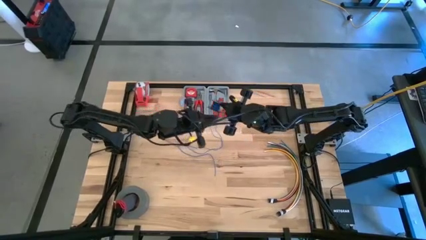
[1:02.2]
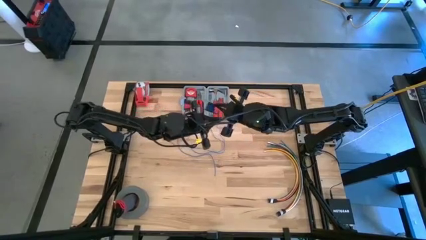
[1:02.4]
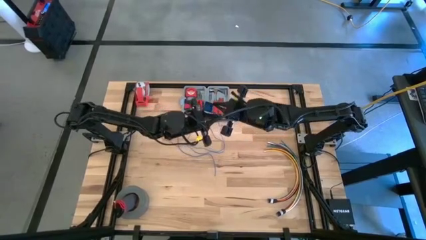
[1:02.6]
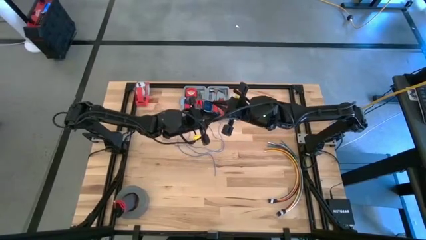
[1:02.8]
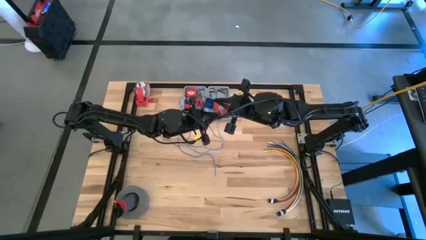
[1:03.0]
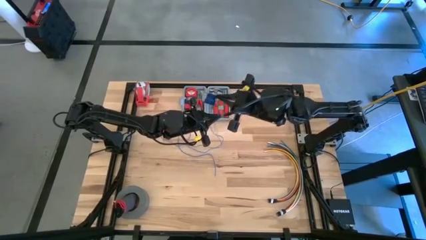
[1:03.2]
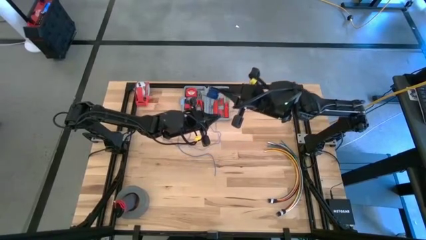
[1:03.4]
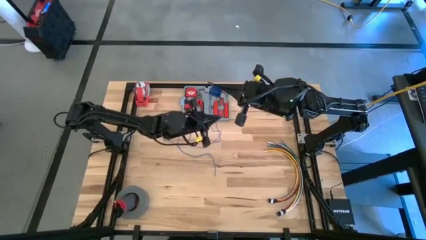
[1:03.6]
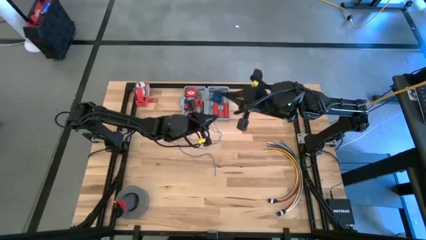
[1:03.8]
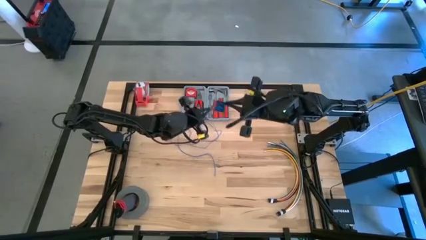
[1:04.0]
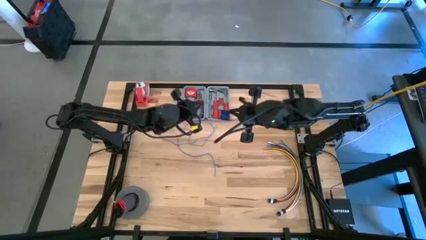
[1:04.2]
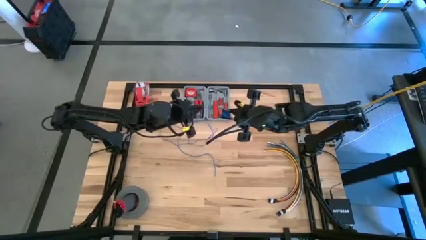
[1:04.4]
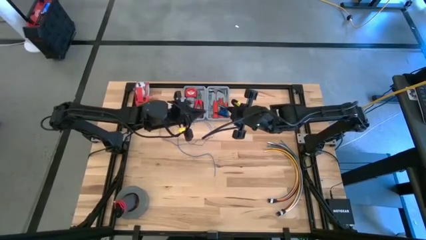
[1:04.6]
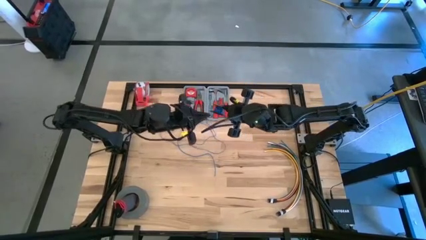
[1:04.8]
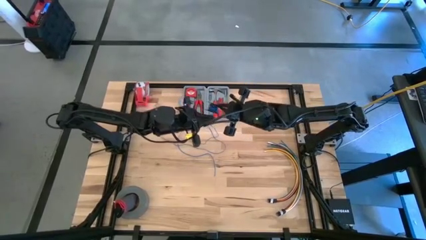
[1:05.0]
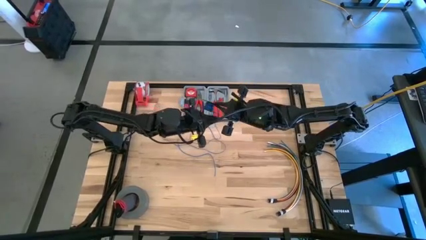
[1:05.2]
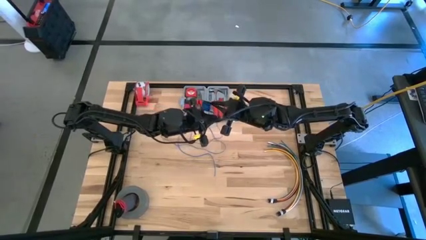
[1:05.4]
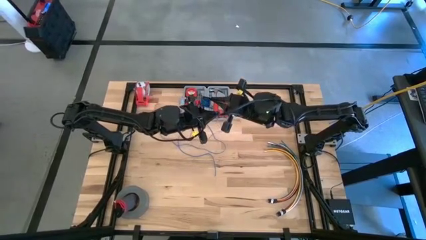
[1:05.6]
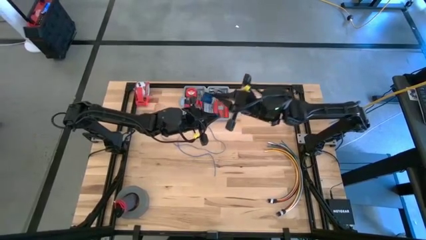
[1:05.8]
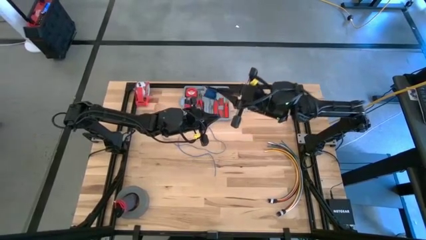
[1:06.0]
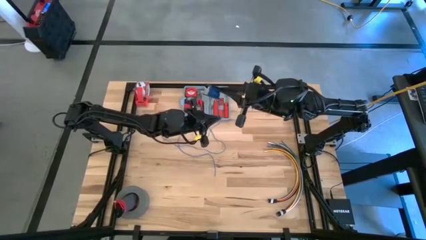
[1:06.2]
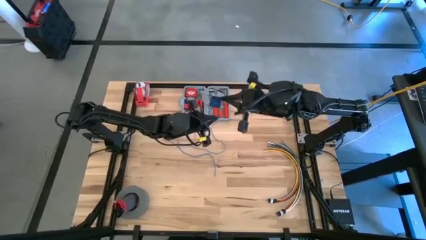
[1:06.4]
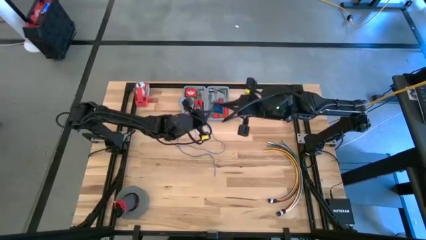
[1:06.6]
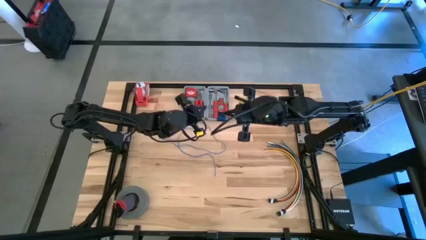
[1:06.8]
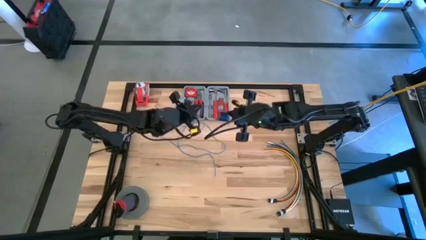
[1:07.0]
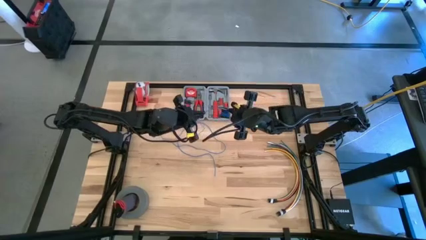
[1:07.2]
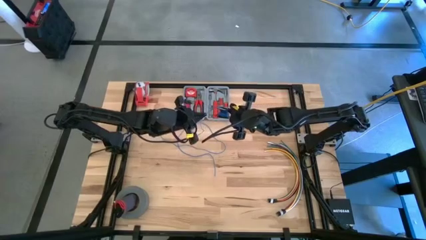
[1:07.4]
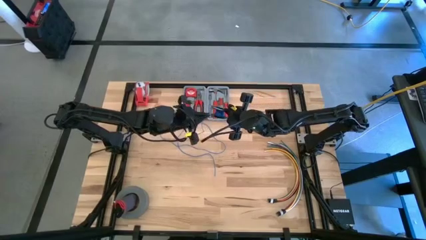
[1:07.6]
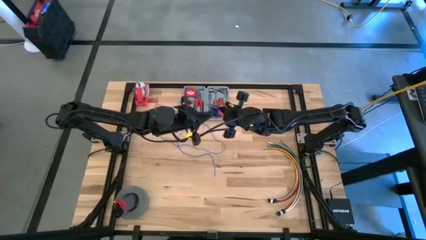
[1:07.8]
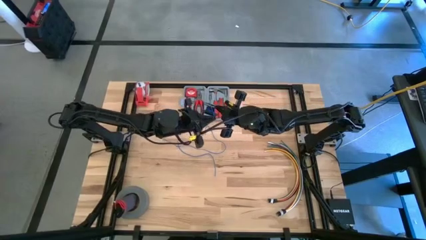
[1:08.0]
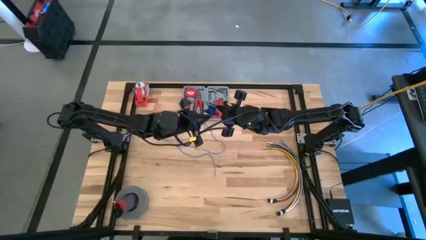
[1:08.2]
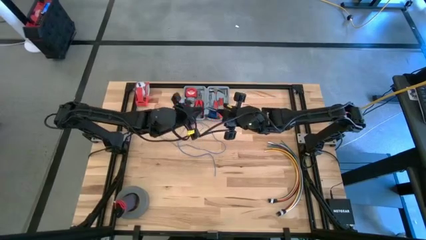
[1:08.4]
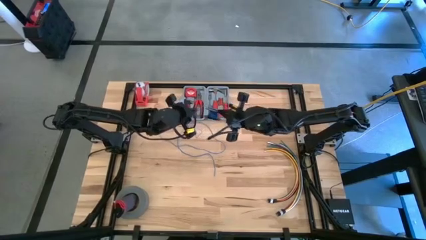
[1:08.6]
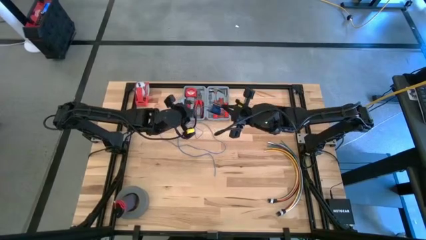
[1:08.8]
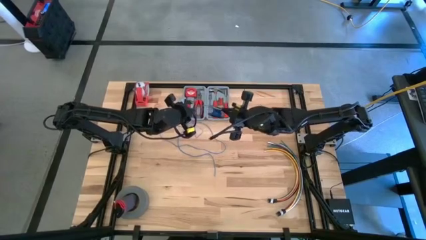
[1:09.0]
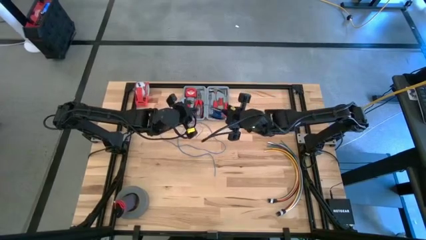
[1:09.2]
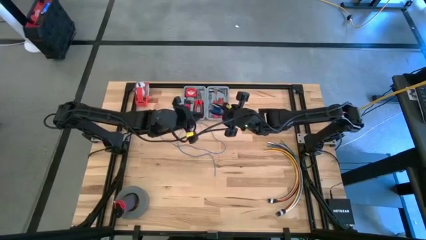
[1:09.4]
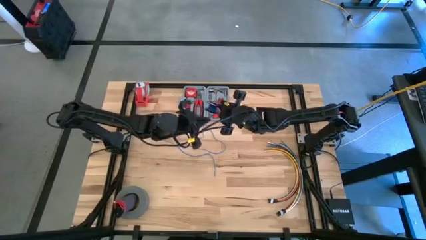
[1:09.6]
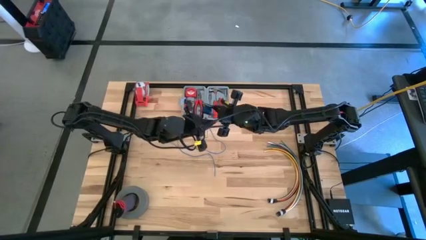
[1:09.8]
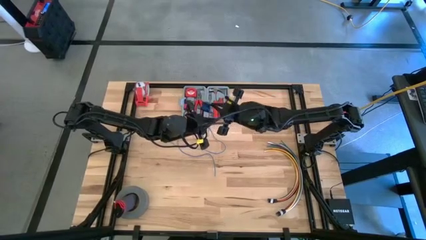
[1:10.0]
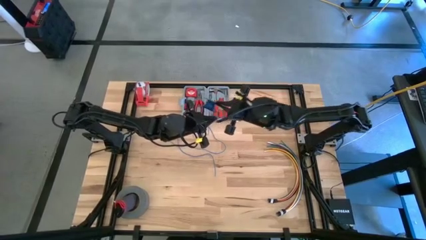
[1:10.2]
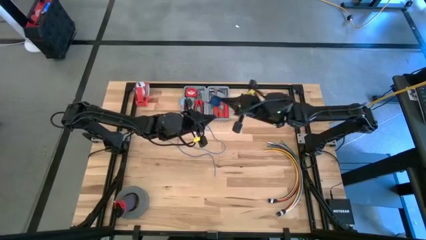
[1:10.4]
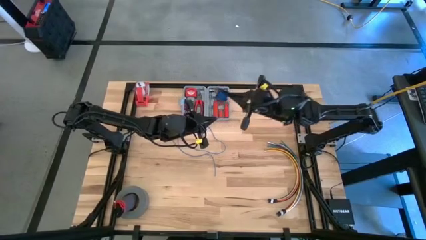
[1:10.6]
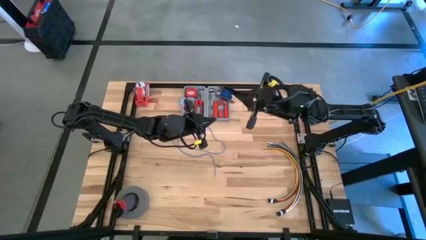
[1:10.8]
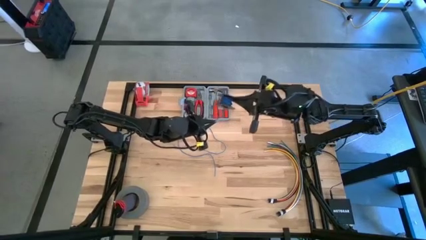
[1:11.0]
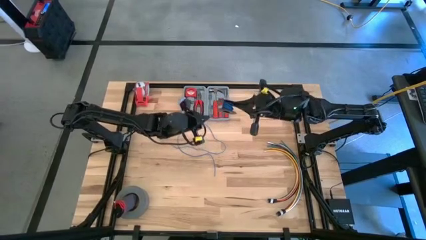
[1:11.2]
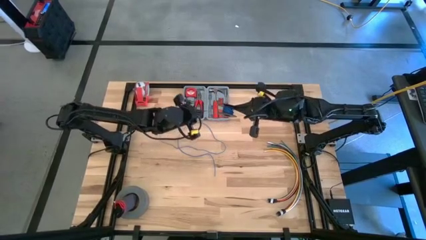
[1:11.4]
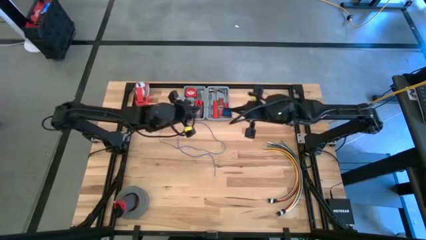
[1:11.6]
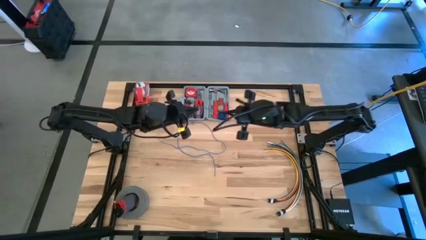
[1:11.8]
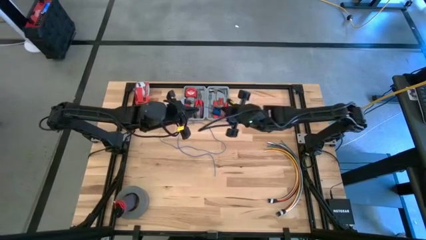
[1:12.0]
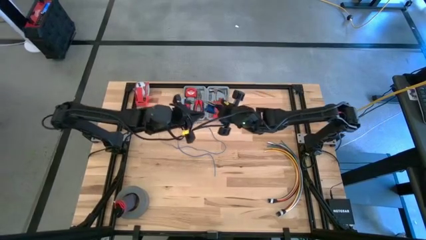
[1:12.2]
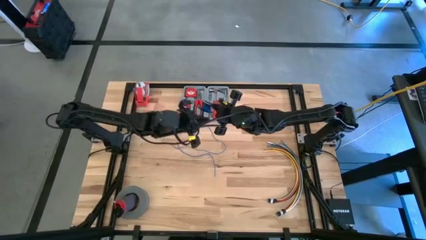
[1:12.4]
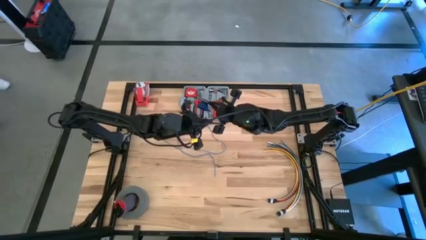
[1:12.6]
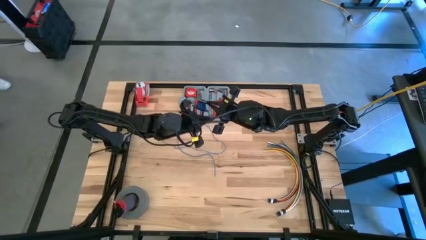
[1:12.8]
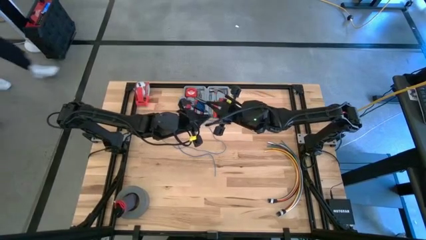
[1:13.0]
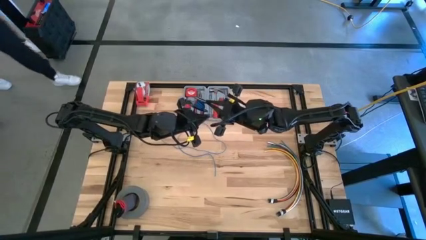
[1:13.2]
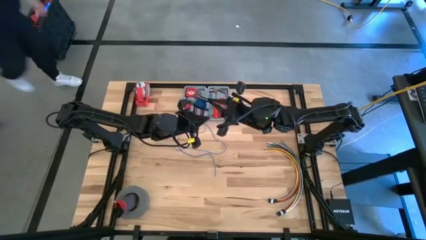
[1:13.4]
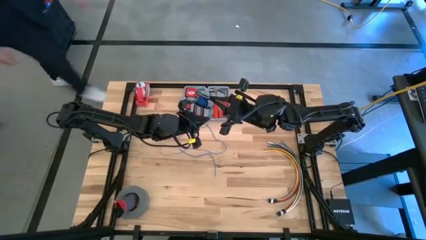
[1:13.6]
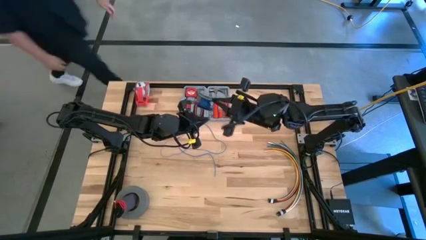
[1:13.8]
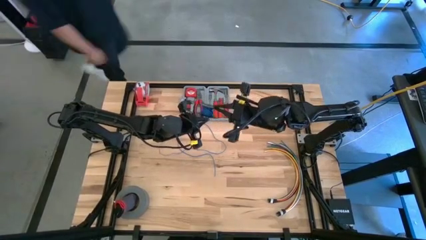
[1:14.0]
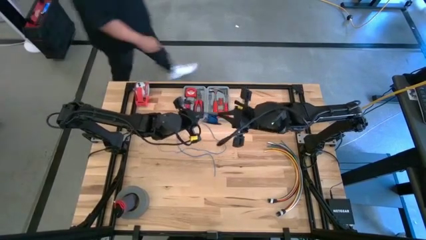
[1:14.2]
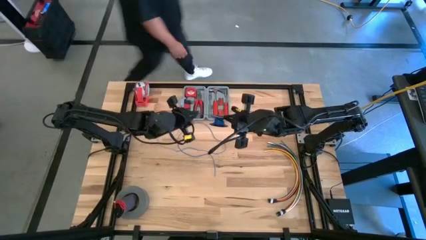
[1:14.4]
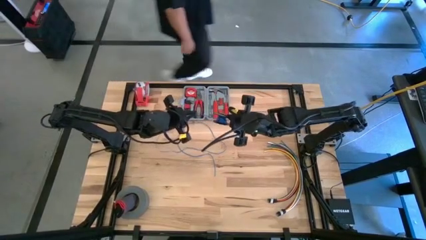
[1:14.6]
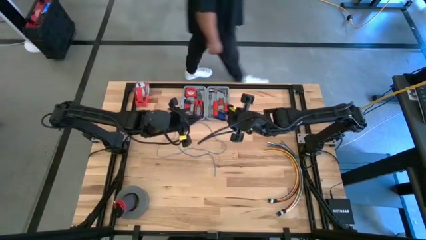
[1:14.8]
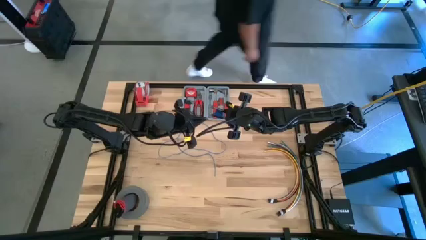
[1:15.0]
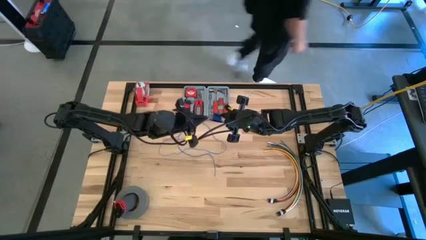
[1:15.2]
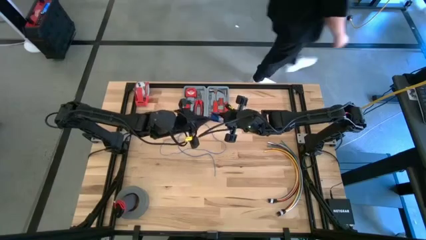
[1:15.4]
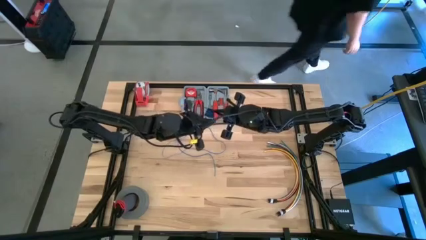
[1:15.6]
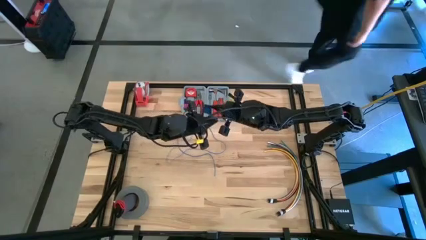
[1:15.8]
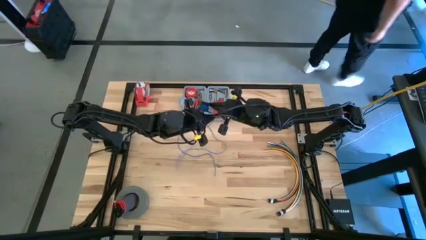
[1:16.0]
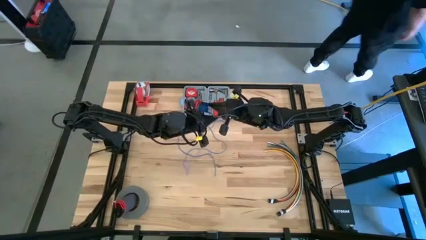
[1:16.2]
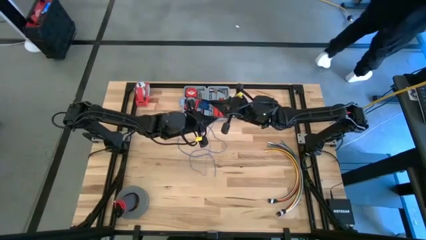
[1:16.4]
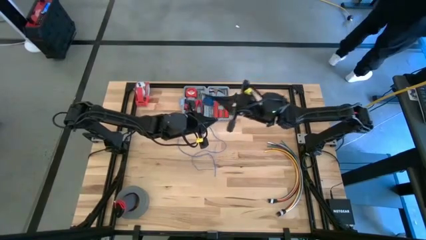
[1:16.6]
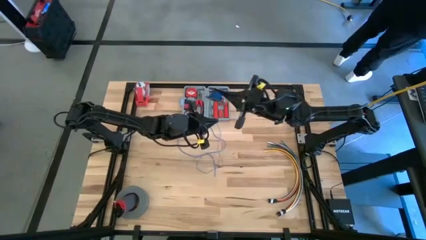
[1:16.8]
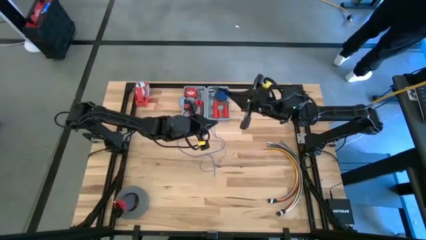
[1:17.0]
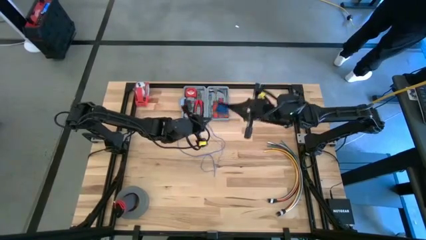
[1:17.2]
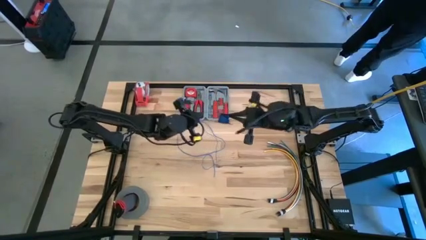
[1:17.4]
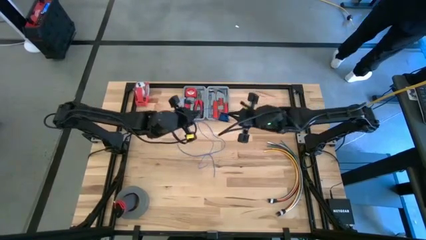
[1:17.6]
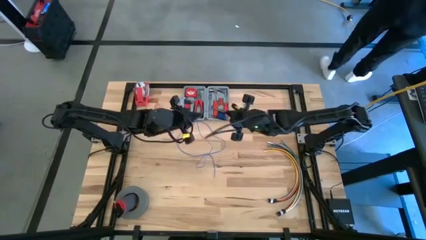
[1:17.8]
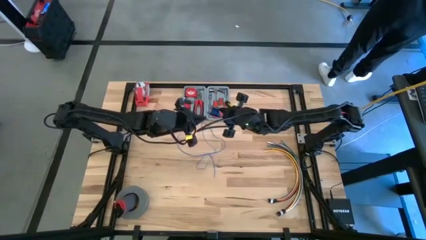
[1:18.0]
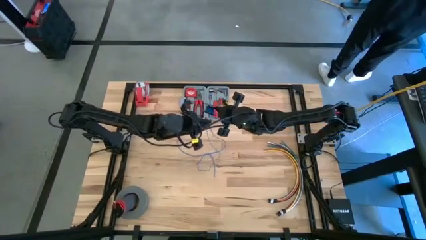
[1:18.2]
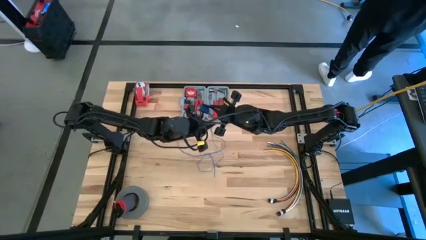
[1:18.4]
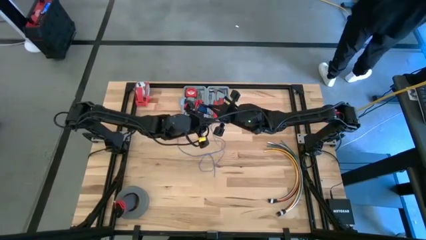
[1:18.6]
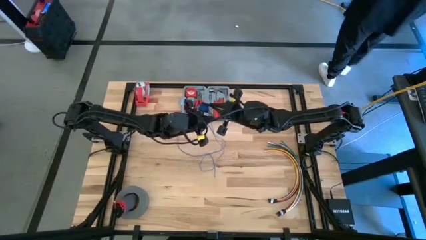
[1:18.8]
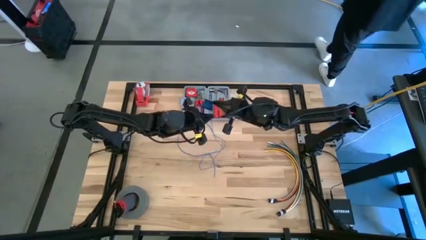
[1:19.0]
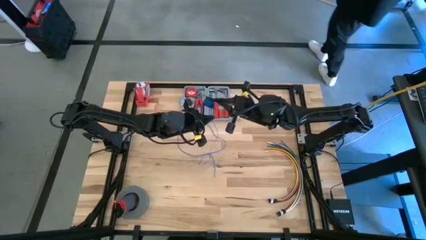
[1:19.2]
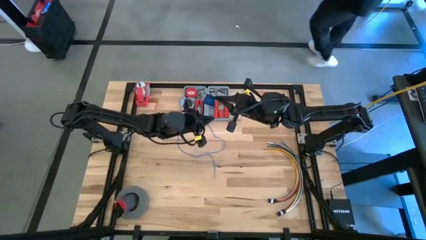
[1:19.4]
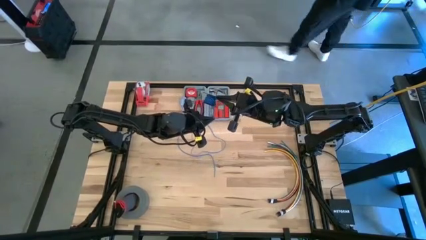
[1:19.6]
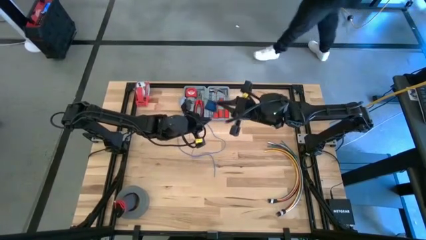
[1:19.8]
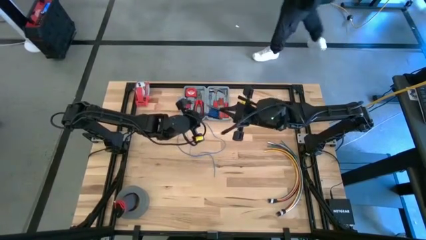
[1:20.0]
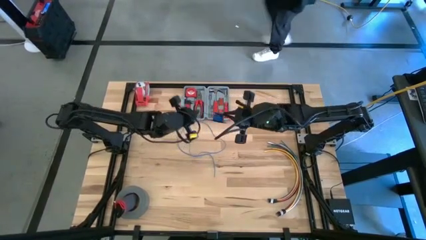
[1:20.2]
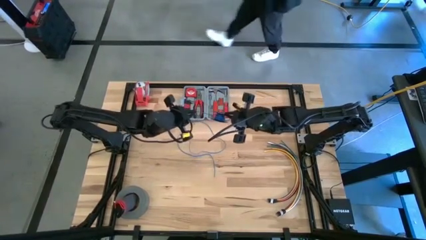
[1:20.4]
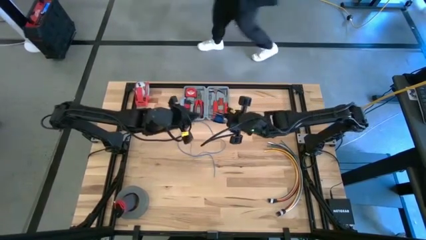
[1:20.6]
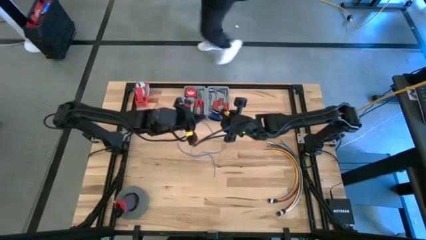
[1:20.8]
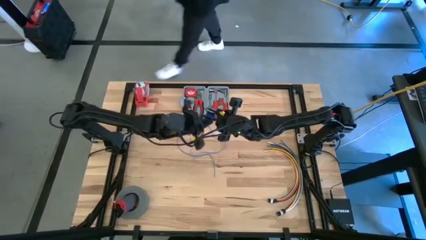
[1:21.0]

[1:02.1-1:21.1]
Task: Coil cords
Coil the blue wire into the black spool
